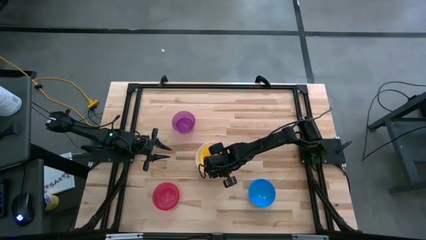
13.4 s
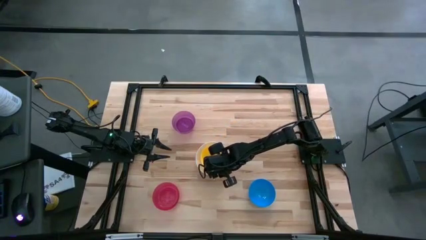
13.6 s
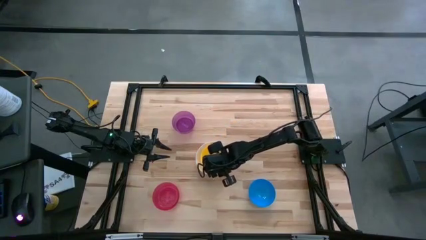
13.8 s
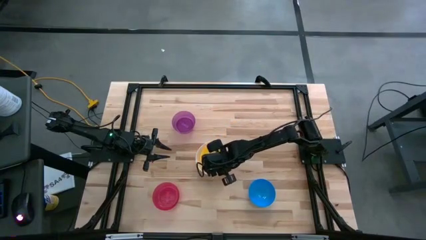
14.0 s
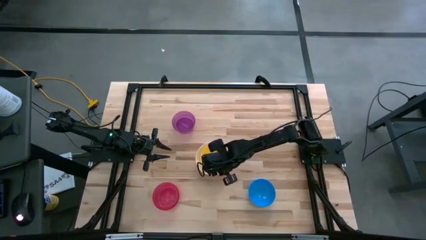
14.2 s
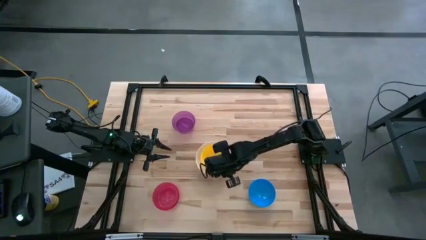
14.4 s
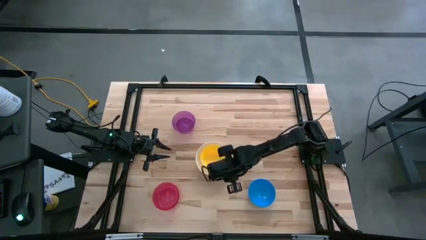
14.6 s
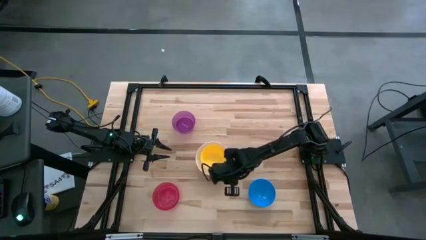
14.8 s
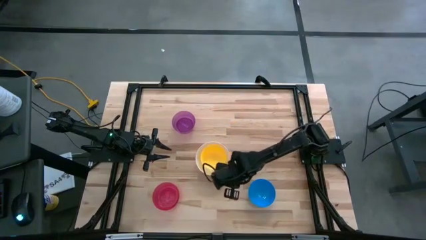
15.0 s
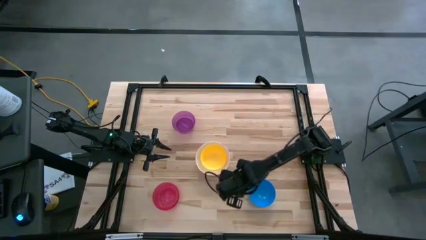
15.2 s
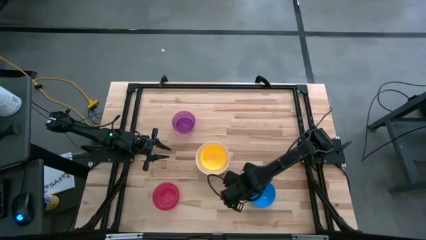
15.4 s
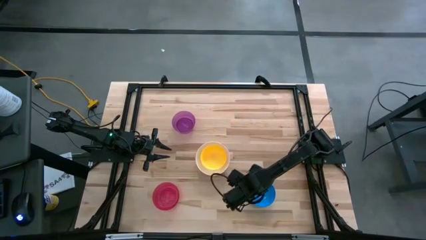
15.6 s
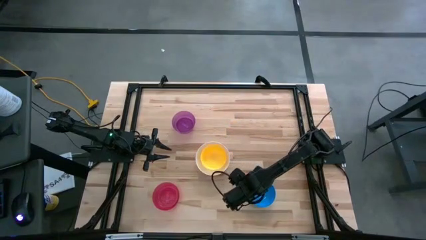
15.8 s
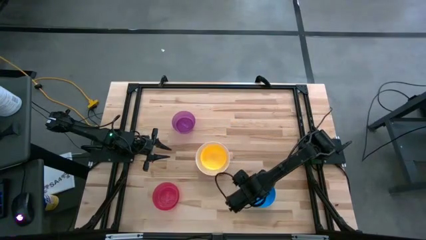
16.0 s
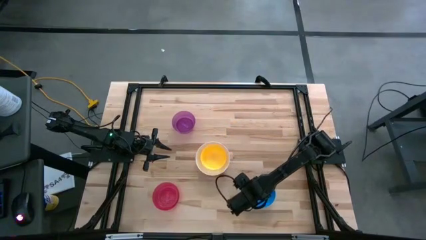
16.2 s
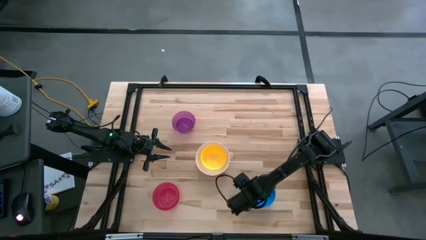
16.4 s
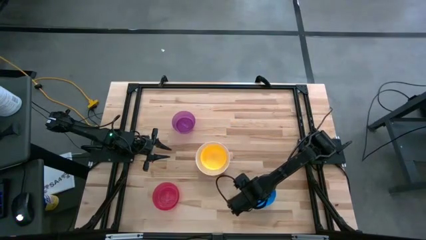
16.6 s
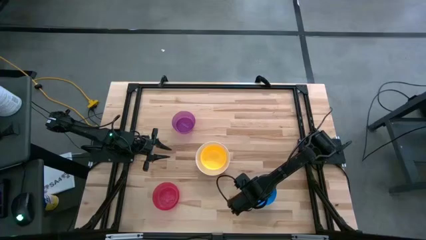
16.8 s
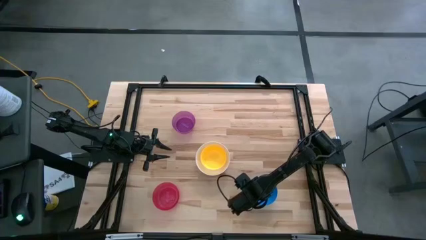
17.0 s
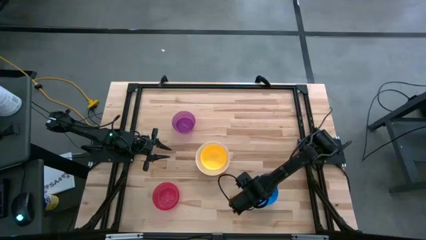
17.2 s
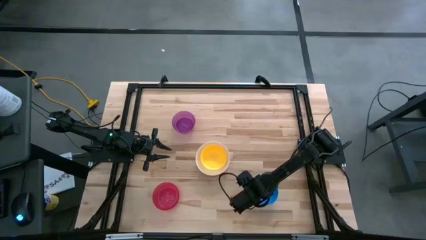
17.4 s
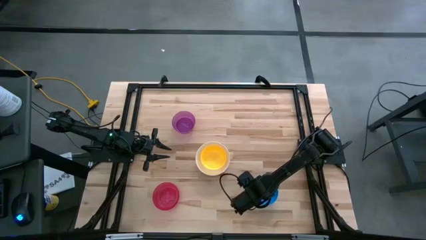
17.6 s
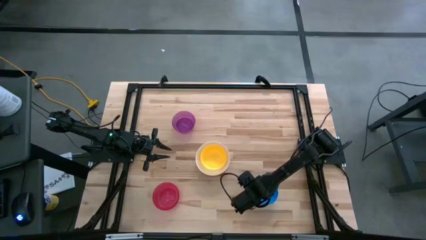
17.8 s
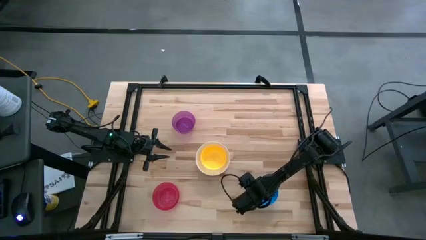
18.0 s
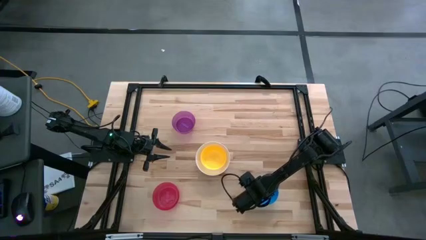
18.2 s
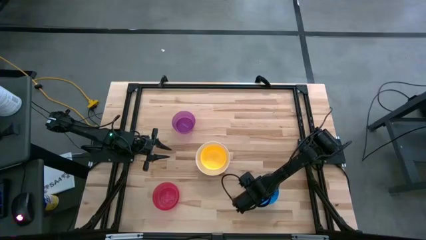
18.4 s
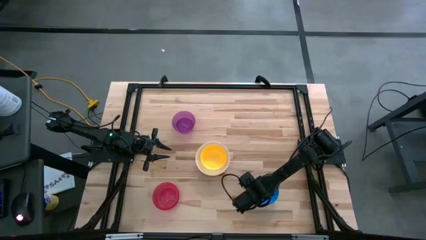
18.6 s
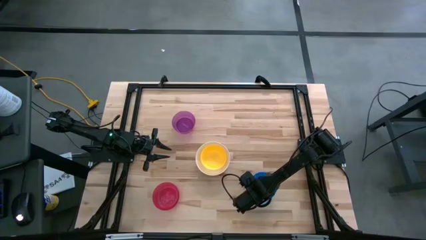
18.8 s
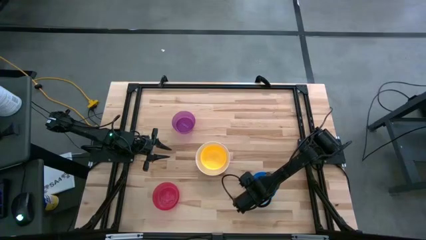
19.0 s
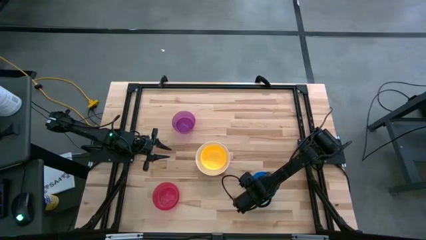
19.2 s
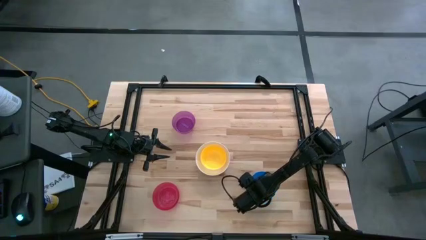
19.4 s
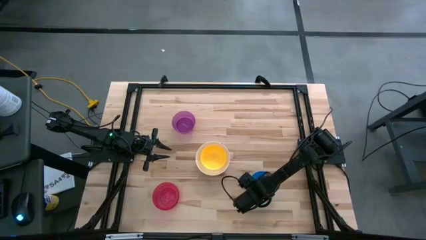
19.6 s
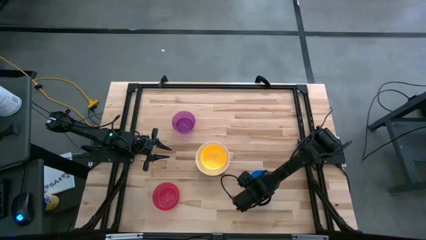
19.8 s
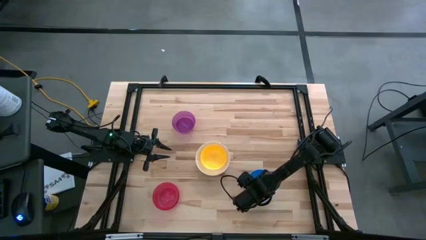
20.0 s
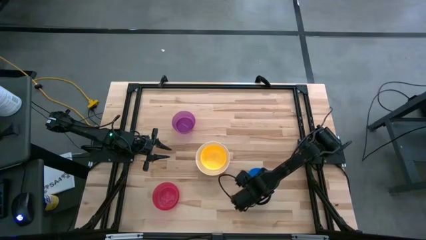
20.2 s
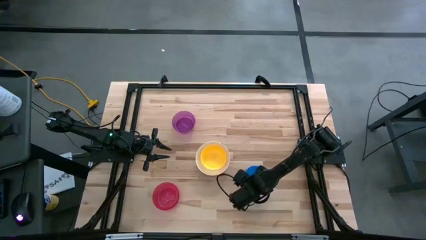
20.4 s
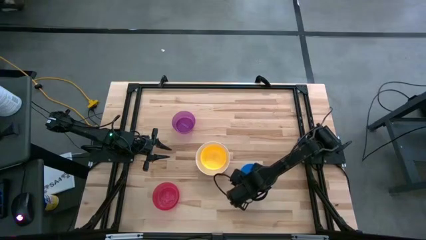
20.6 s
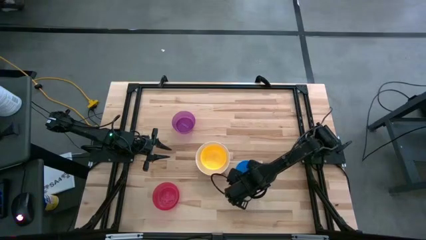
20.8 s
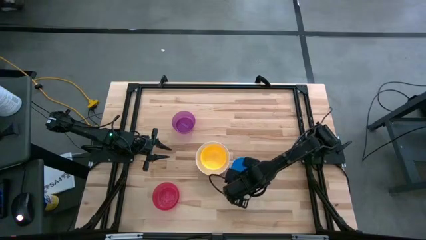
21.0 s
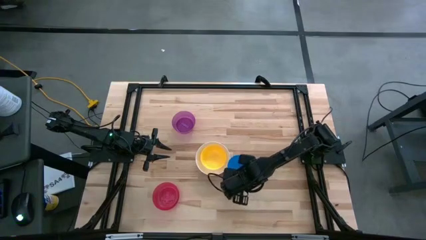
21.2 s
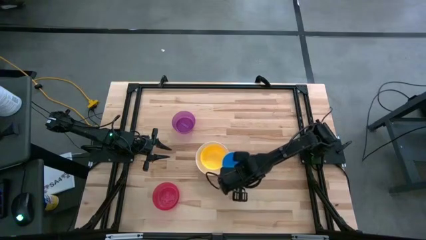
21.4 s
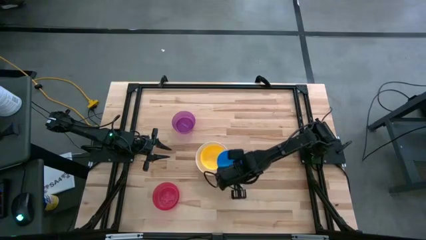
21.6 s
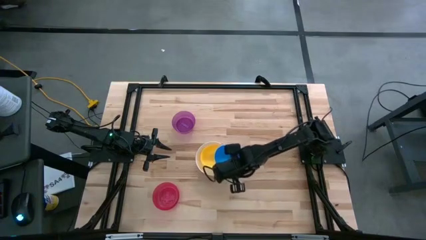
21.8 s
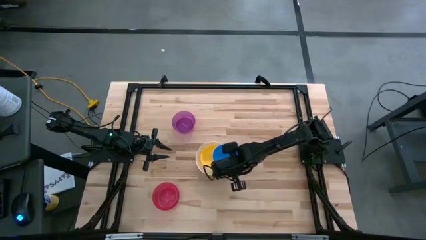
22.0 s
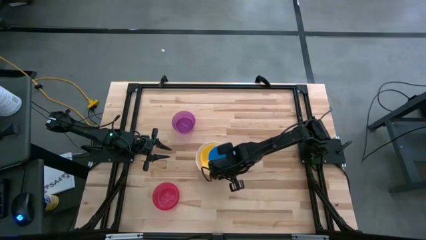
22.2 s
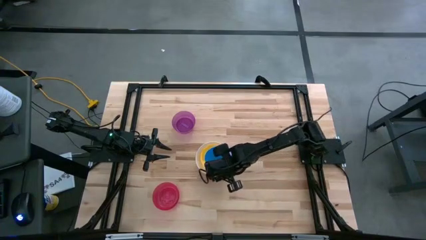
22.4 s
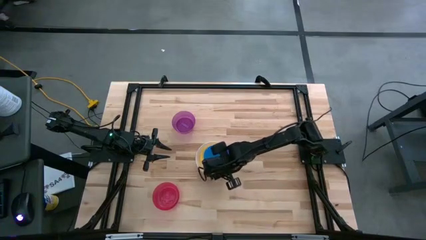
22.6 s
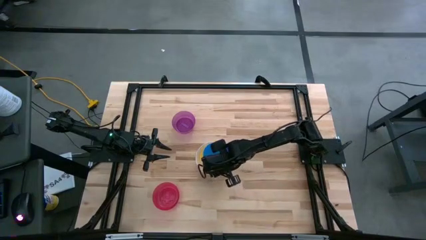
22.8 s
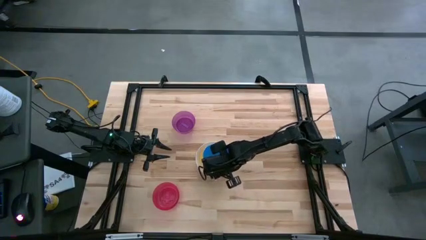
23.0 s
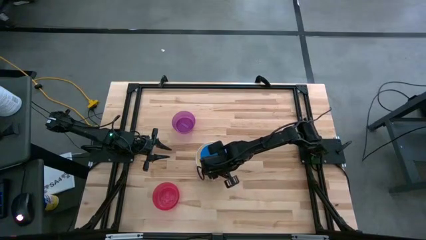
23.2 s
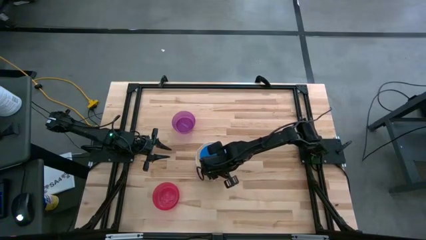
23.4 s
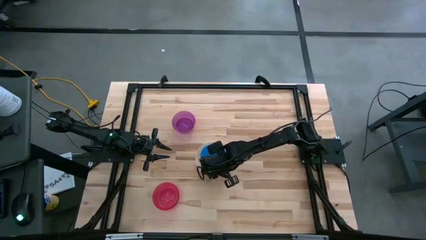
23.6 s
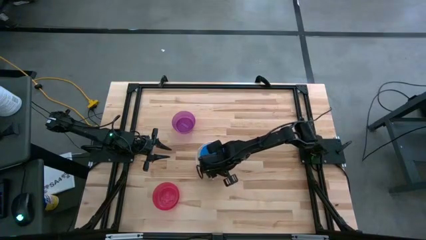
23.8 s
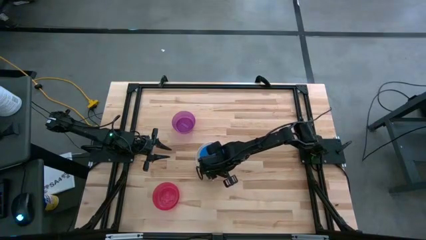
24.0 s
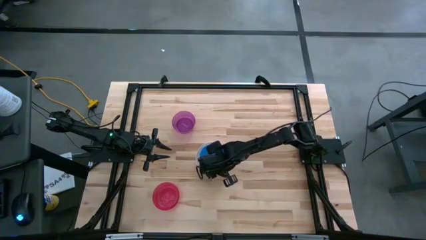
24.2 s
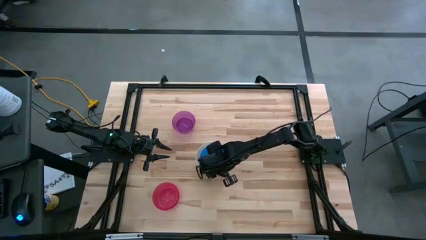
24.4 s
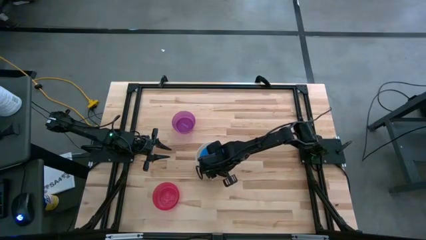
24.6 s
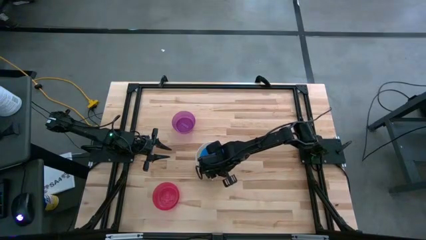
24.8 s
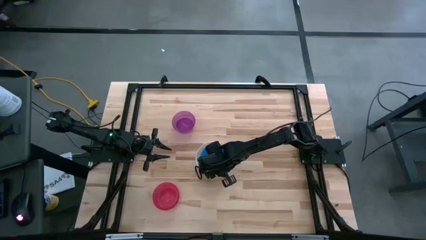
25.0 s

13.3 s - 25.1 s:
Stack the blue bowl on the yellow bowl
